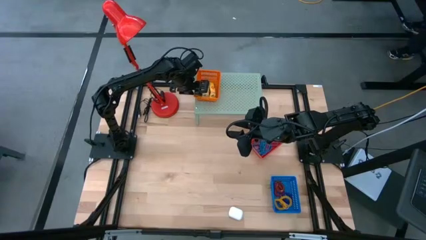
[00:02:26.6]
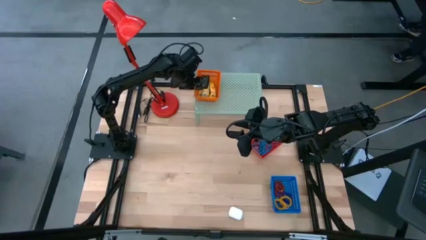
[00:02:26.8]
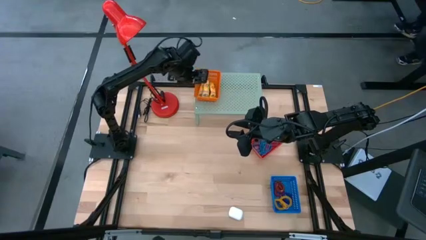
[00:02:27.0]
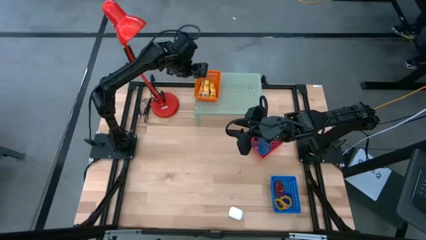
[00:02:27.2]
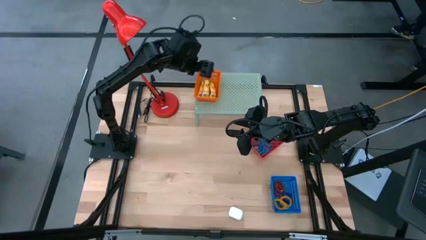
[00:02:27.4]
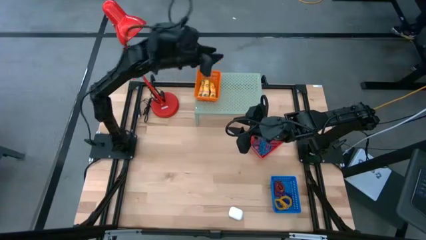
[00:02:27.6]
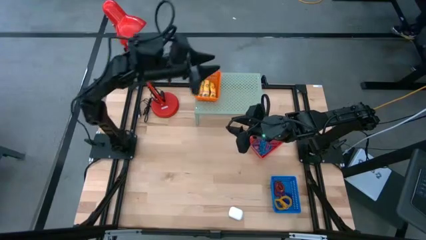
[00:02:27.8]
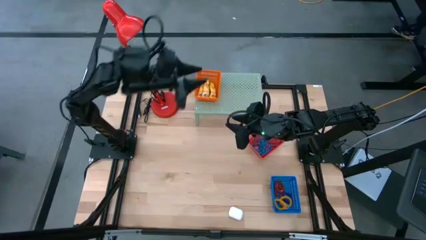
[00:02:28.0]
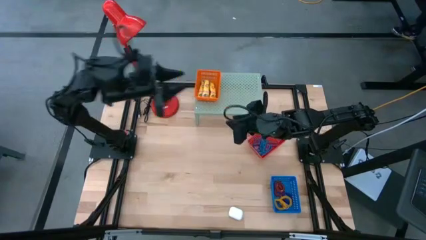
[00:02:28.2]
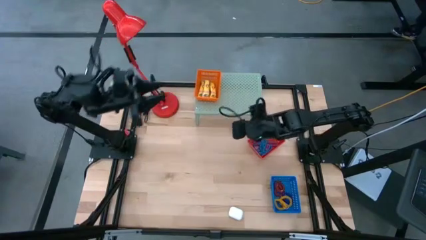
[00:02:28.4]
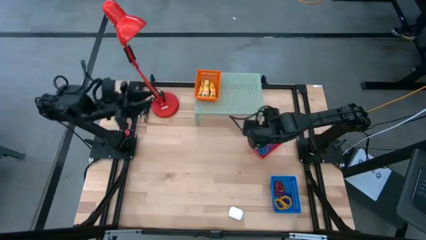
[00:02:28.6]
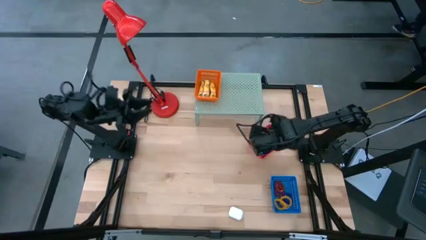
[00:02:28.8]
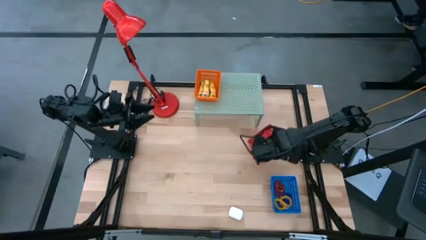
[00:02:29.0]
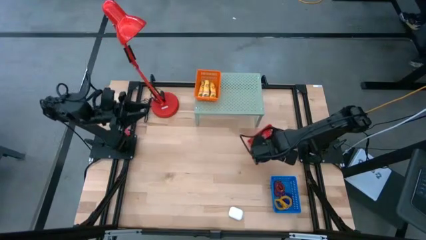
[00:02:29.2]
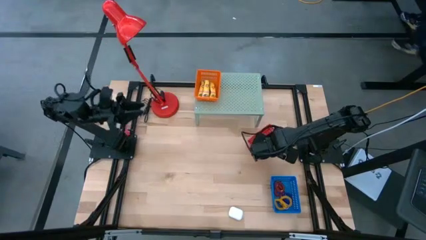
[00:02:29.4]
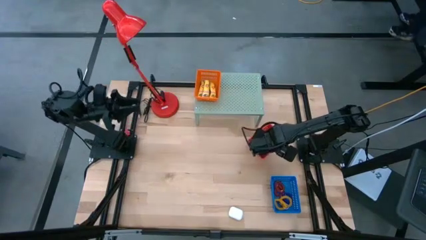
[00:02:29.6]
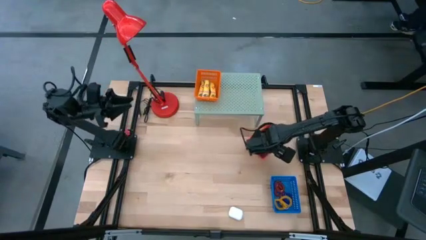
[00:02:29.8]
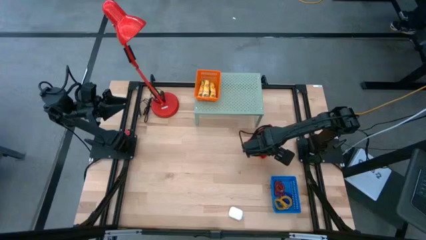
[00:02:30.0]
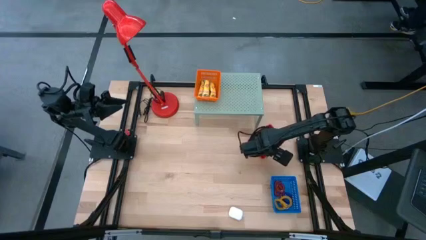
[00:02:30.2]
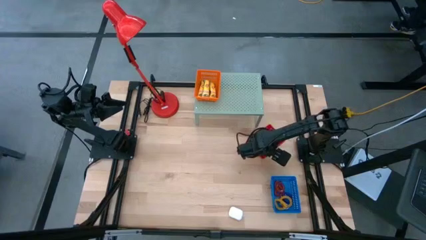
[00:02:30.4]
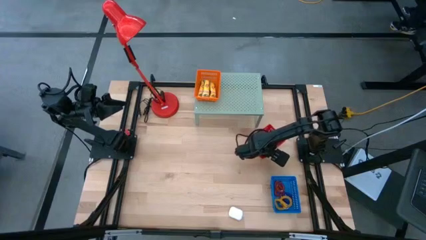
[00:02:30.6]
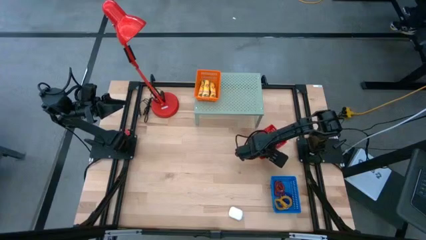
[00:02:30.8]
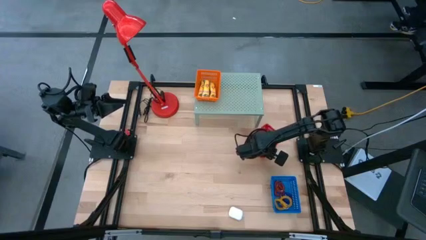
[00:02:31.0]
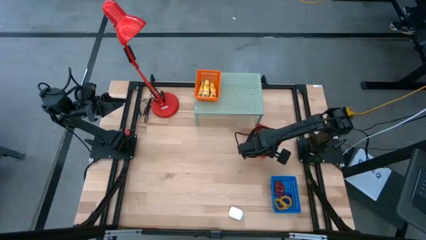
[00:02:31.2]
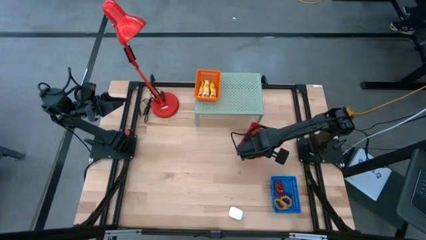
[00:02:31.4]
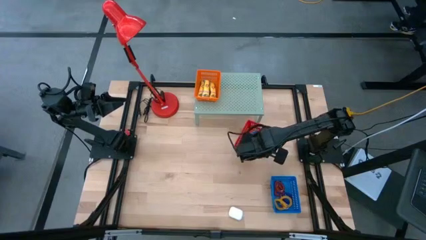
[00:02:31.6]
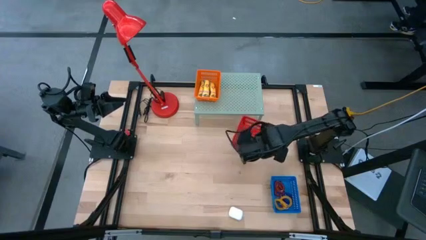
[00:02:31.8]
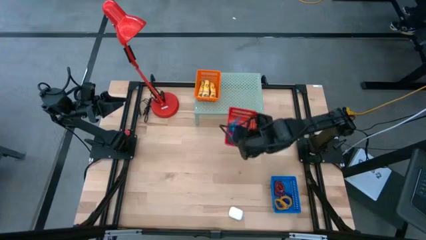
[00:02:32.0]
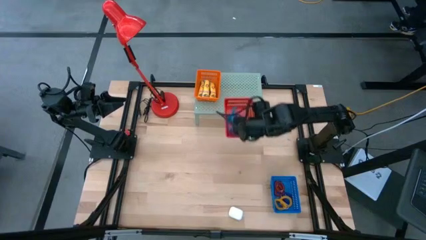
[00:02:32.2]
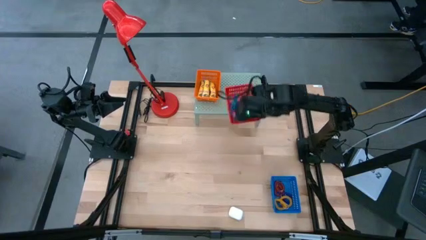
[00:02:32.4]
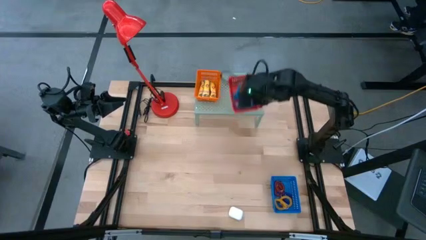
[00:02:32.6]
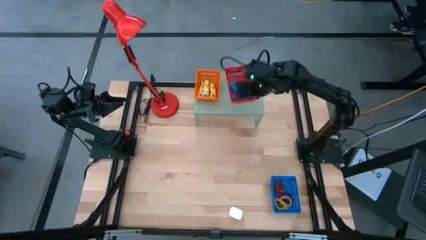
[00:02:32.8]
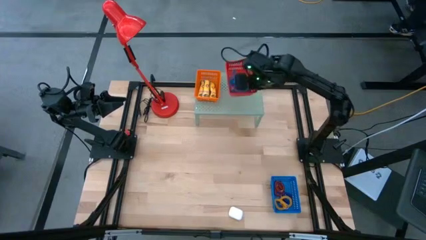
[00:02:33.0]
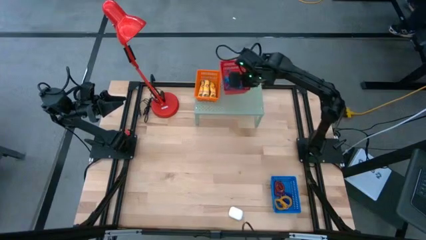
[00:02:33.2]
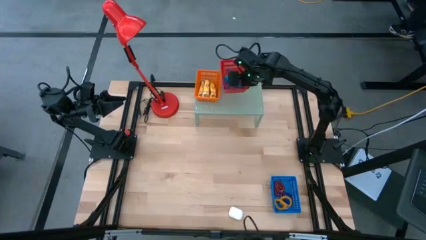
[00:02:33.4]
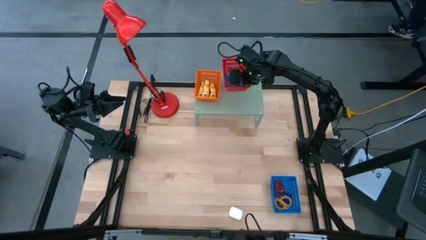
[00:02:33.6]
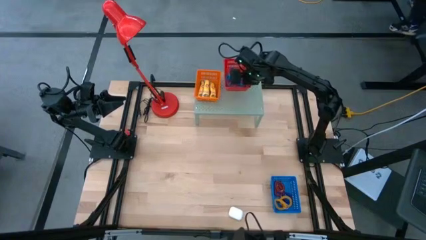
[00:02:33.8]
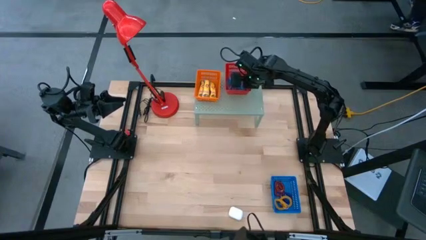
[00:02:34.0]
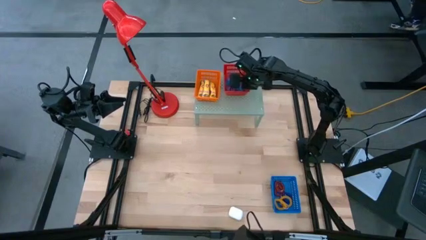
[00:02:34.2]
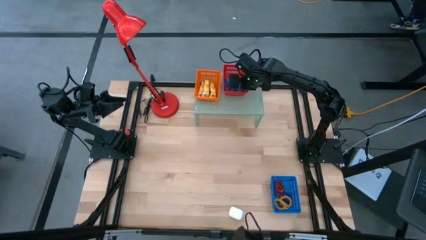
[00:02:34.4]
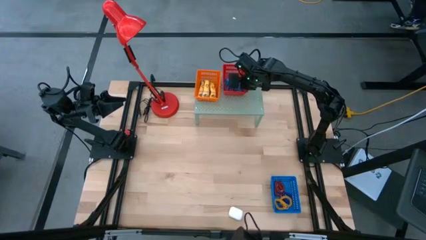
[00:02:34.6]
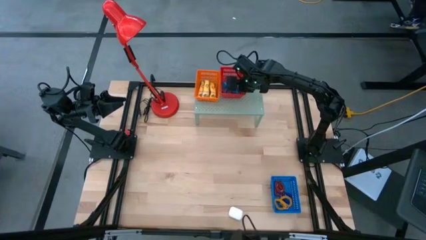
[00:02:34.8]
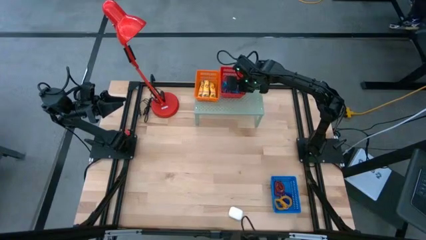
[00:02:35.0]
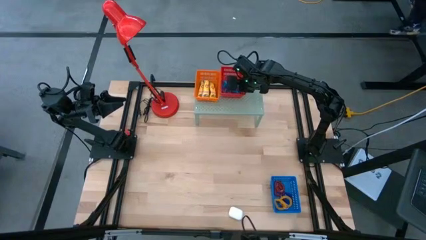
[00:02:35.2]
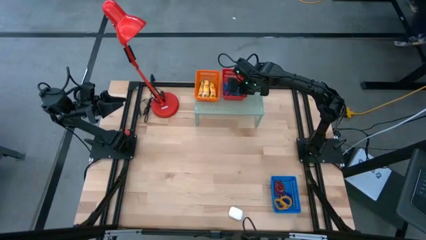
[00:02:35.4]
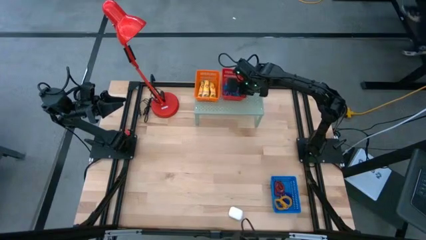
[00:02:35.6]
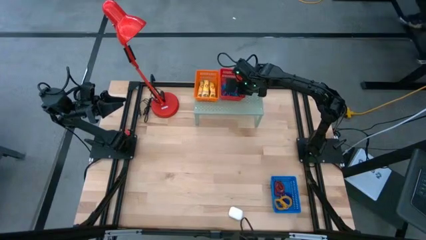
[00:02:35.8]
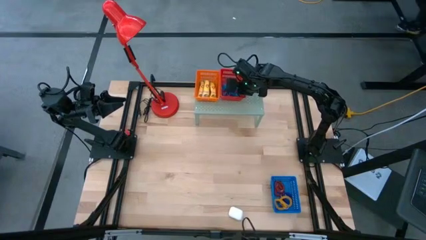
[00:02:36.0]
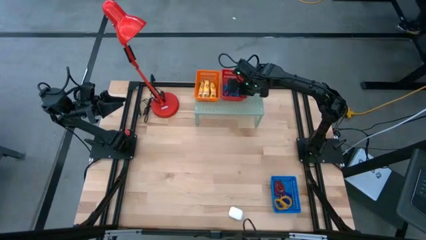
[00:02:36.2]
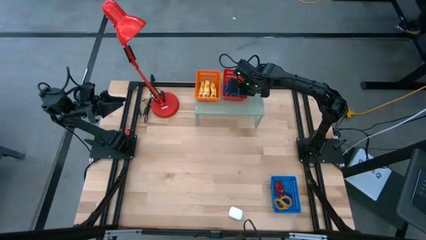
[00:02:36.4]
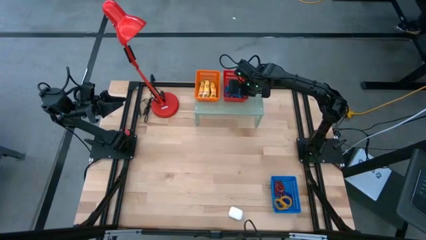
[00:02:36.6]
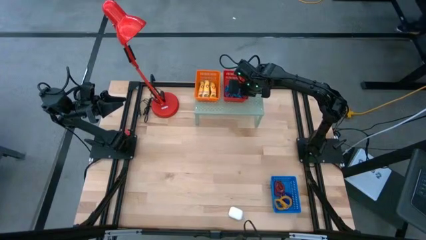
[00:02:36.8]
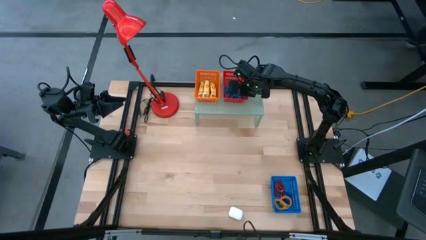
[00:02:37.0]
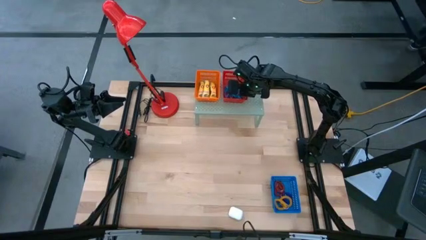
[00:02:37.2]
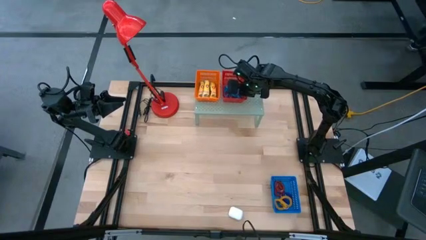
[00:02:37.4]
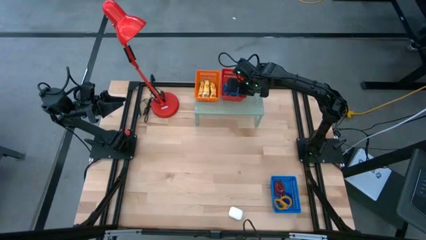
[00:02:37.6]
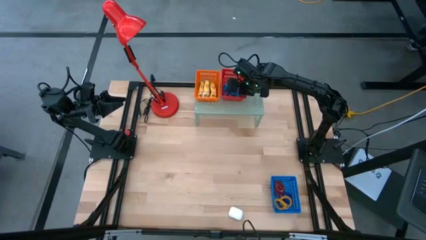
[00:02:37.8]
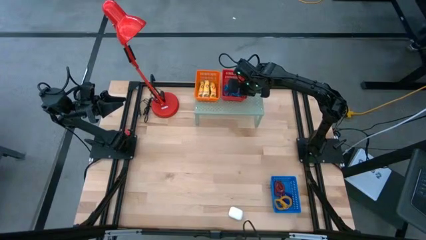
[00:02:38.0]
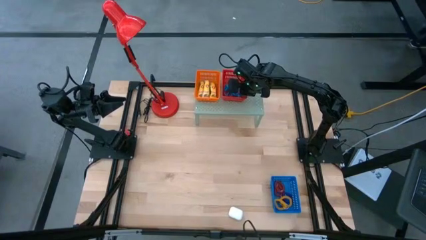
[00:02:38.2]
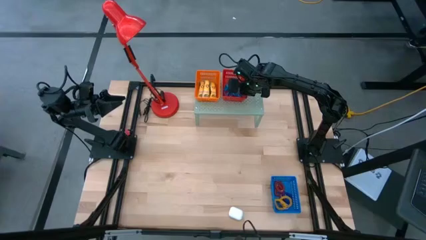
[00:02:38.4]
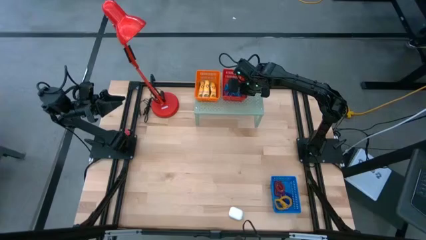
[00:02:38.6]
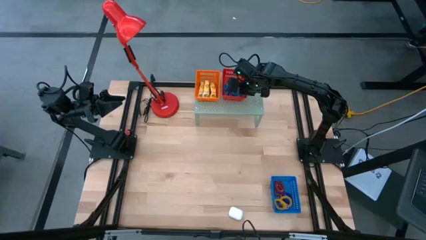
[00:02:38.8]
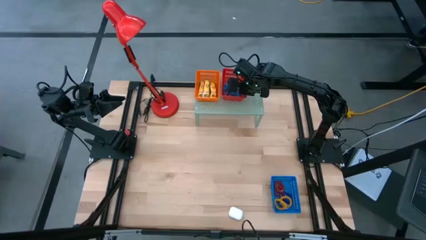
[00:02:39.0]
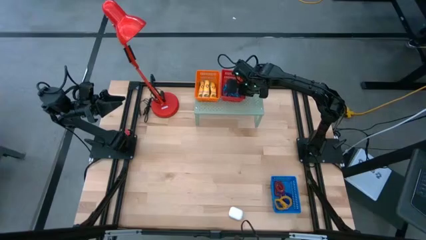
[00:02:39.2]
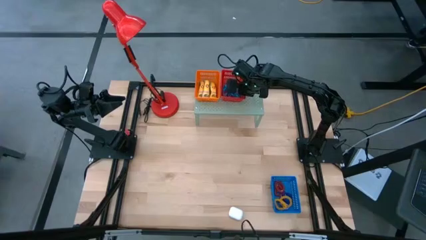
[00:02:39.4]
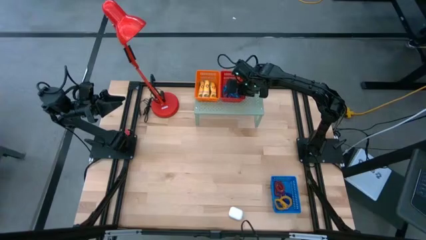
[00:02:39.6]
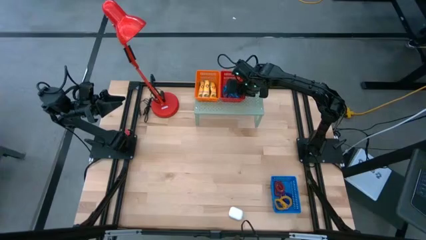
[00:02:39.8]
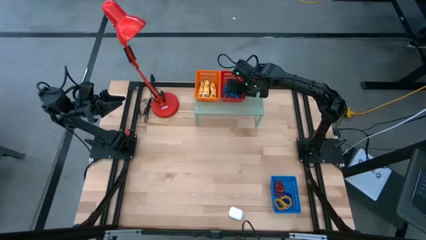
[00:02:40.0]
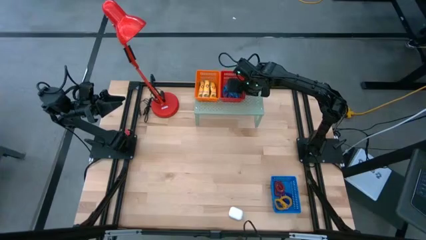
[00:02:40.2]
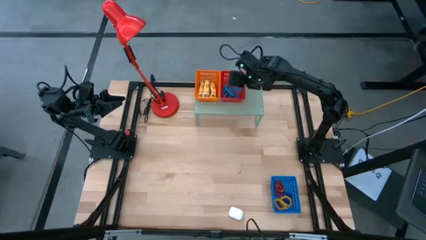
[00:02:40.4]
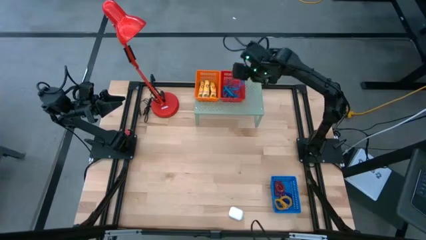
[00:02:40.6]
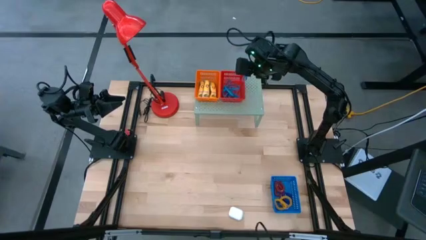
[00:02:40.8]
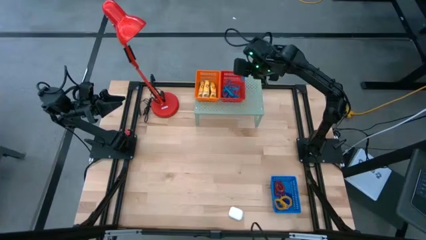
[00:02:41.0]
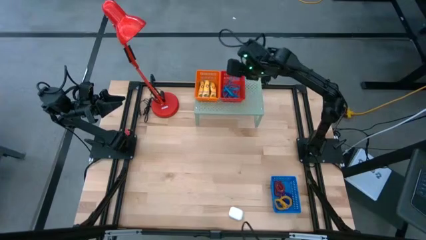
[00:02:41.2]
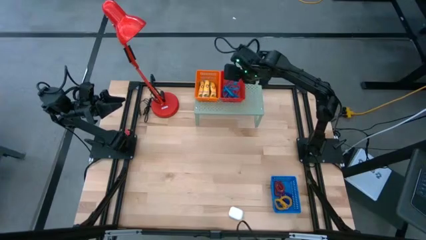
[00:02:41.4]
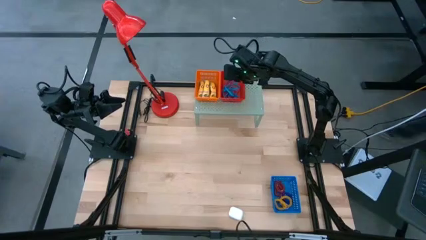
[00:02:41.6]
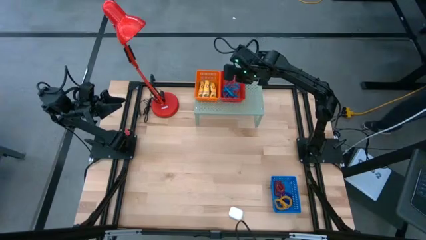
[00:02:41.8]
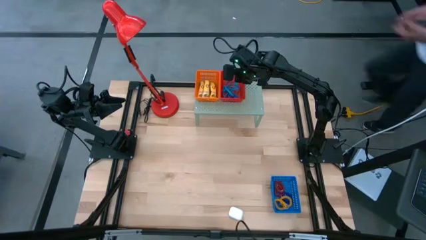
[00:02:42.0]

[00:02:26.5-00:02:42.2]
Task: Pick & Place Office Desk Supplies
Put the red bin on the shelf

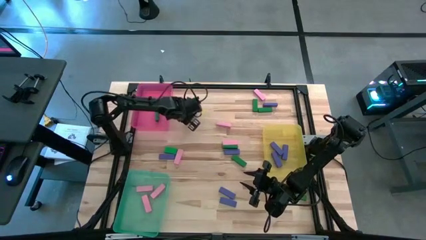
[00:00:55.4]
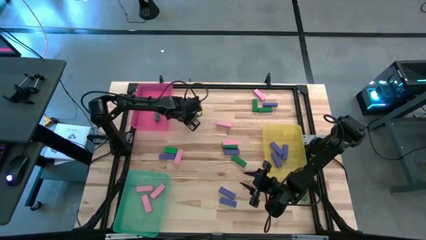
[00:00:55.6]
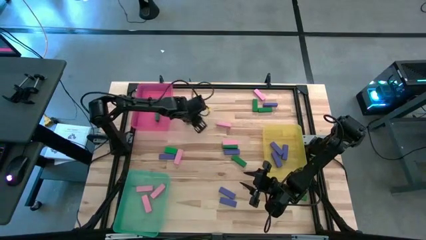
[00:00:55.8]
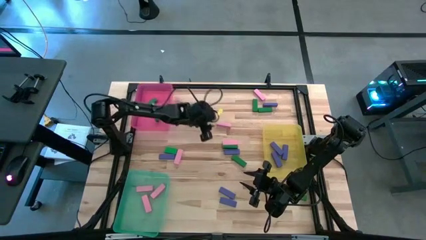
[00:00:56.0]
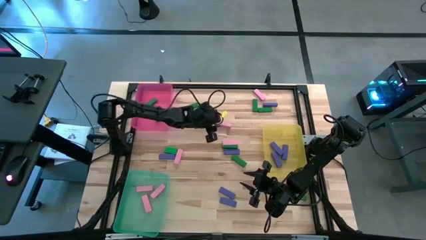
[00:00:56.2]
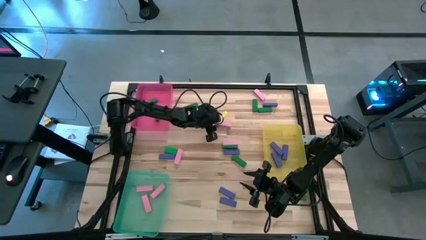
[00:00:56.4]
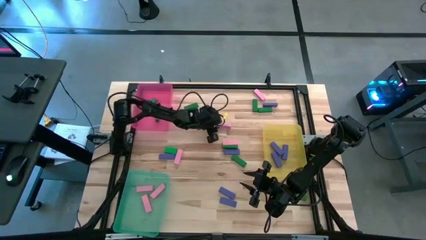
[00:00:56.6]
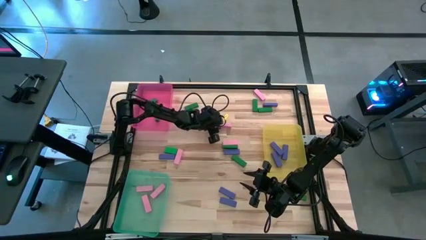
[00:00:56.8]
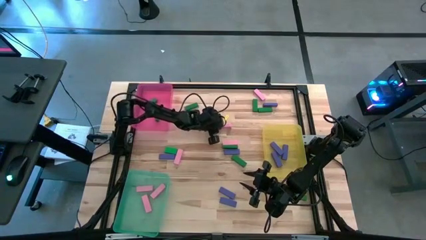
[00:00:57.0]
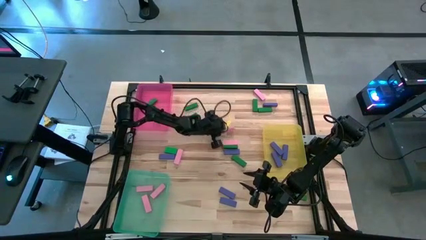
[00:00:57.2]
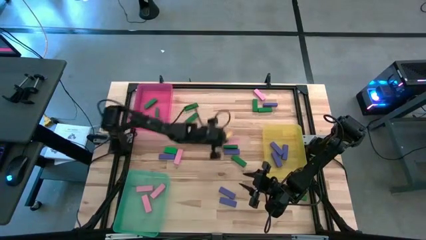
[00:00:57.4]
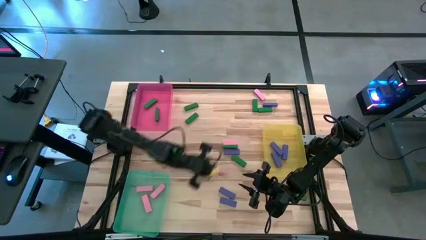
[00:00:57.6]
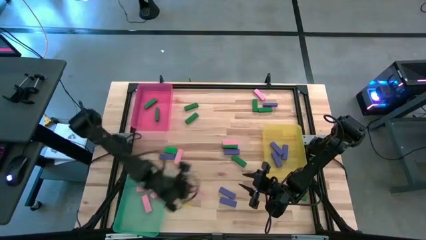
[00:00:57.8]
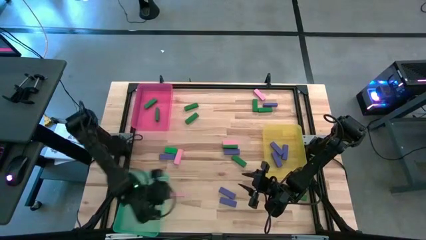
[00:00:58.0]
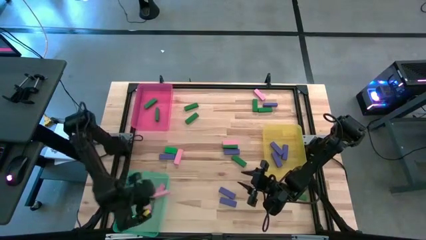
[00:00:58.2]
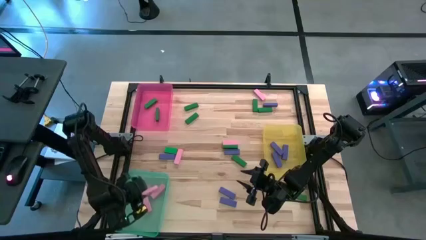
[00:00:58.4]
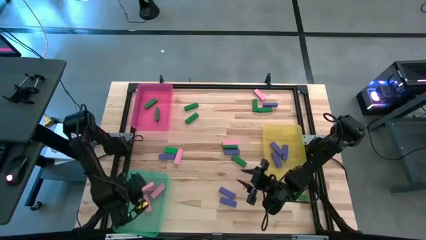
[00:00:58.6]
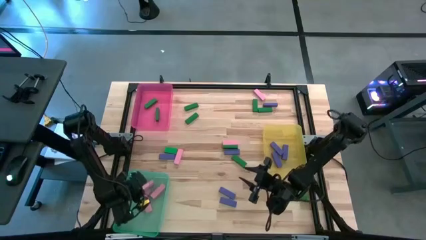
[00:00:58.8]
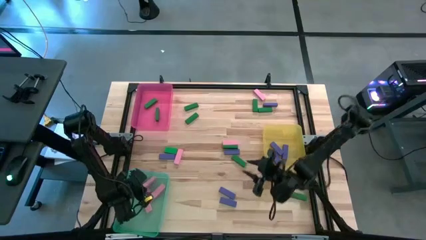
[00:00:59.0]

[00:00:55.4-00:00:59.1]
Task: Sort blocks
Put the pink block into the green bin
